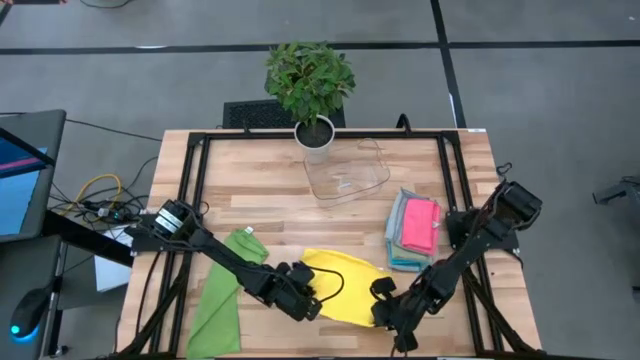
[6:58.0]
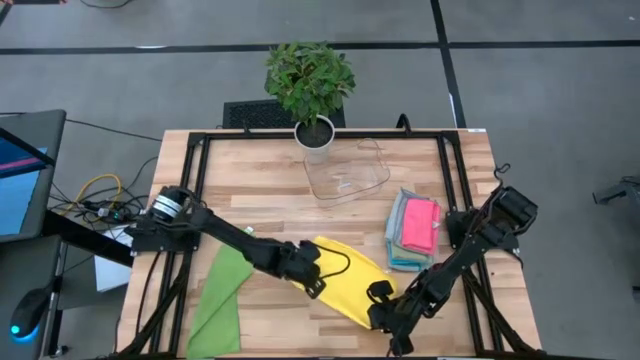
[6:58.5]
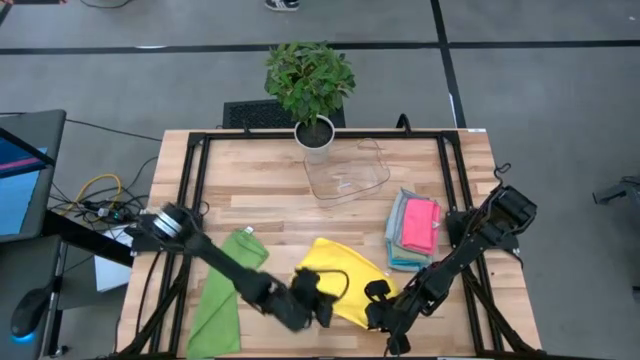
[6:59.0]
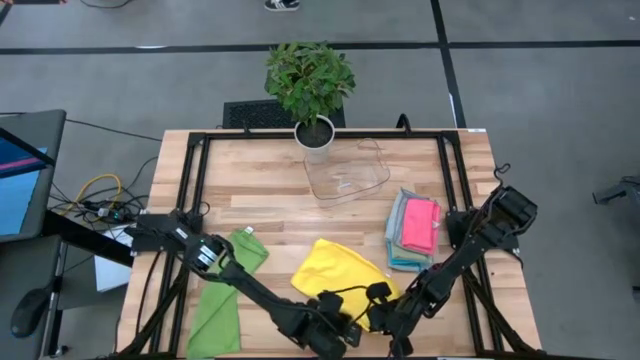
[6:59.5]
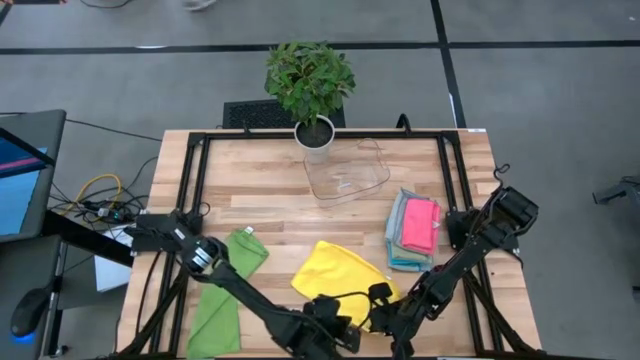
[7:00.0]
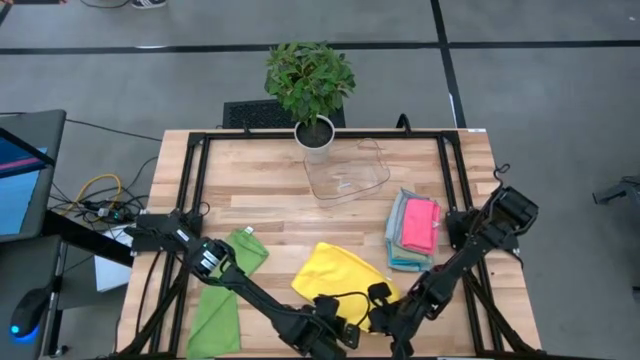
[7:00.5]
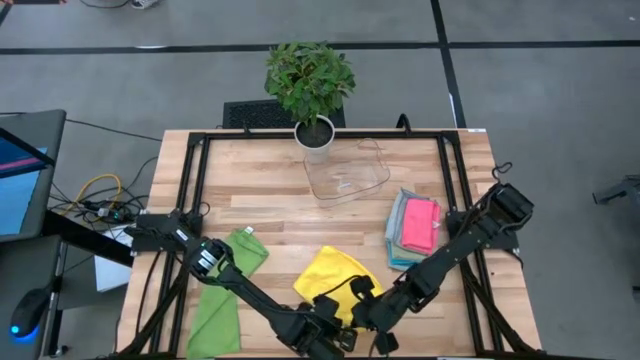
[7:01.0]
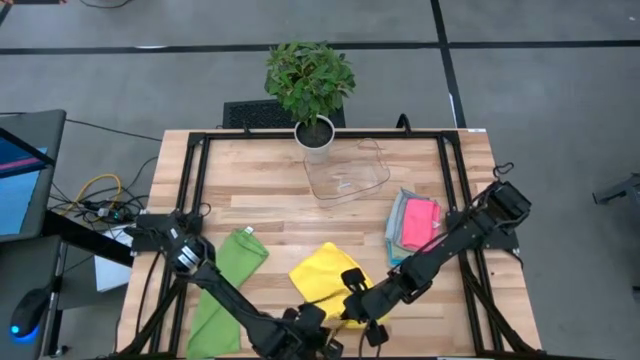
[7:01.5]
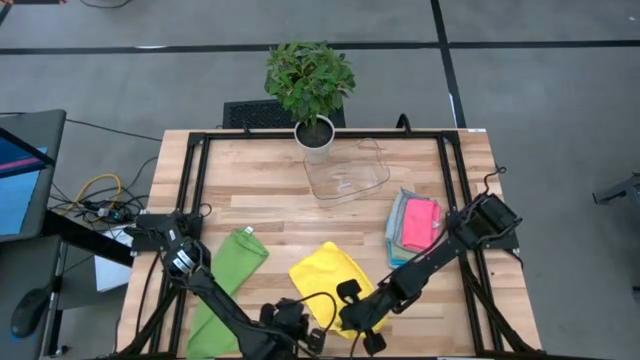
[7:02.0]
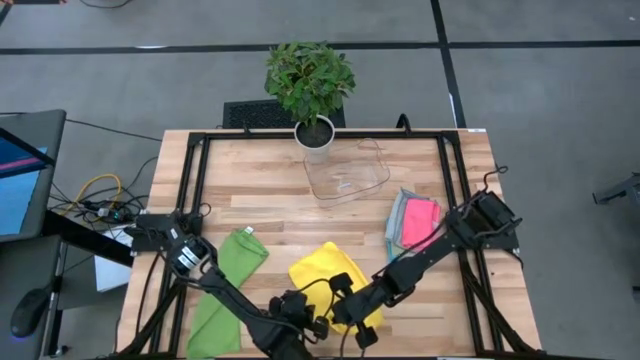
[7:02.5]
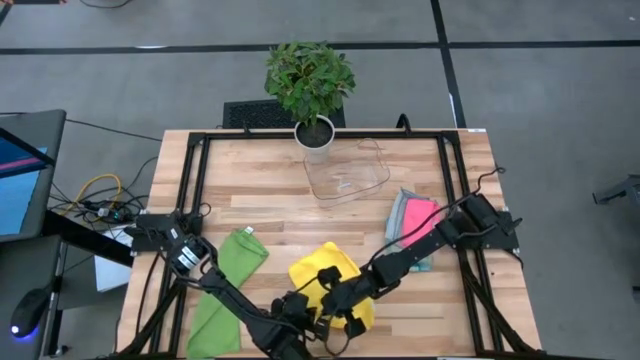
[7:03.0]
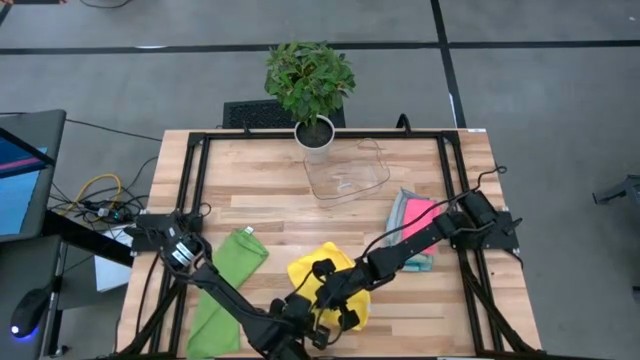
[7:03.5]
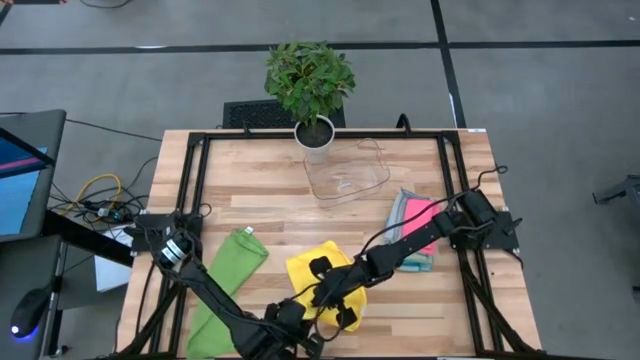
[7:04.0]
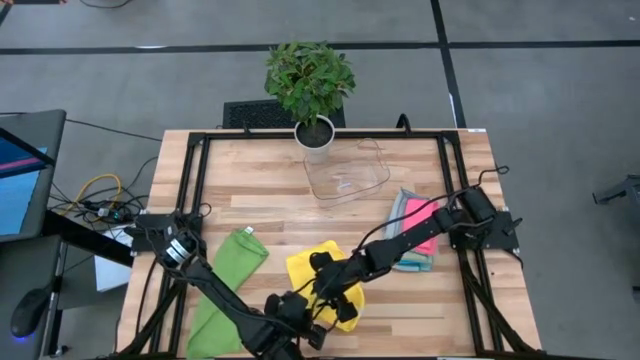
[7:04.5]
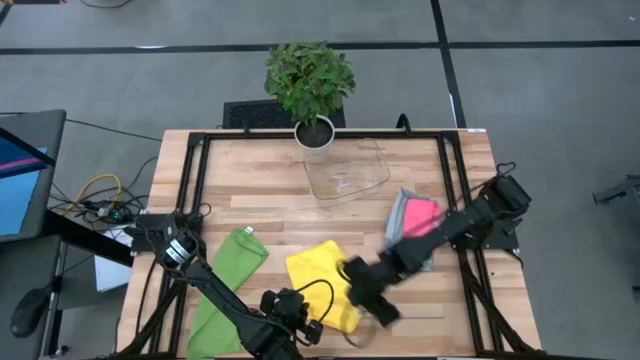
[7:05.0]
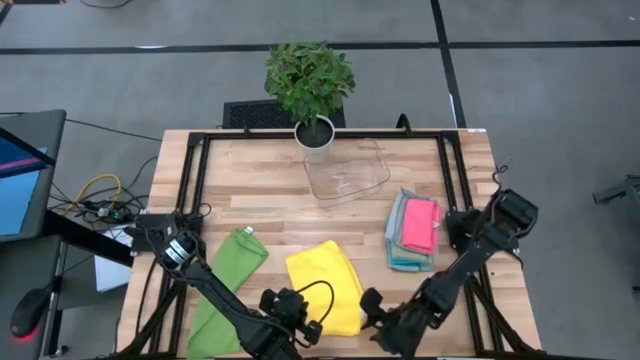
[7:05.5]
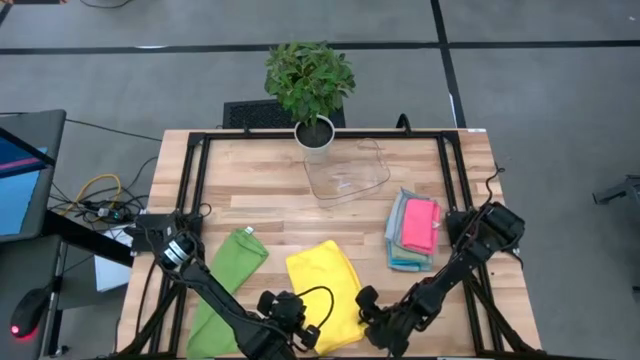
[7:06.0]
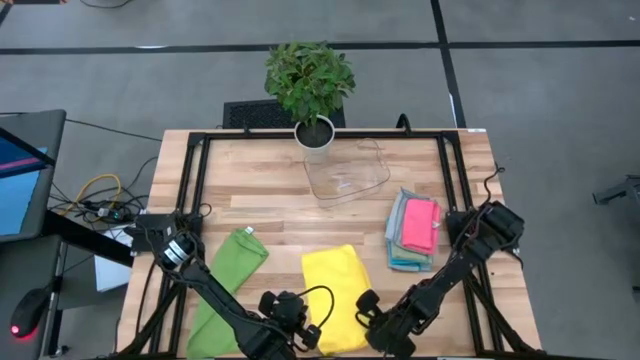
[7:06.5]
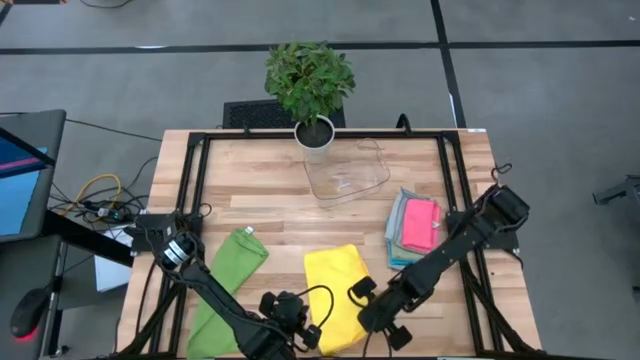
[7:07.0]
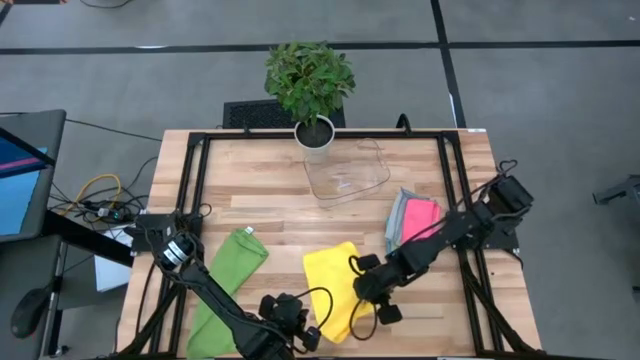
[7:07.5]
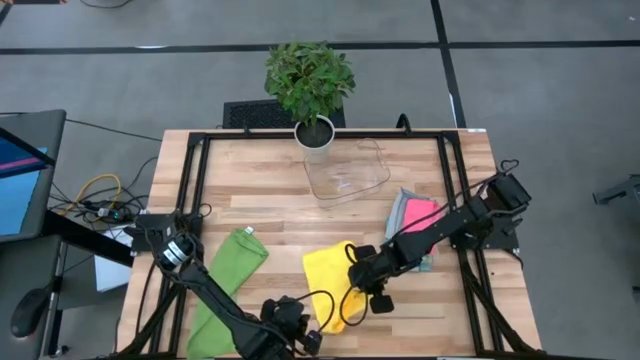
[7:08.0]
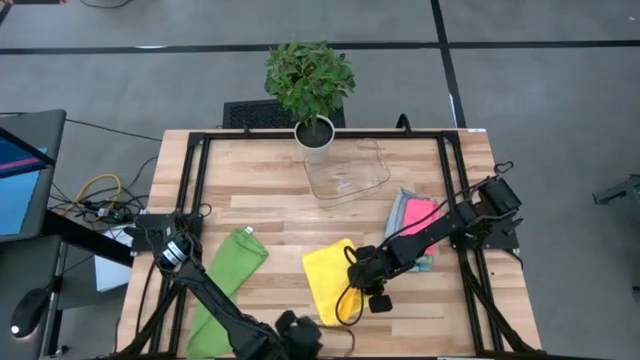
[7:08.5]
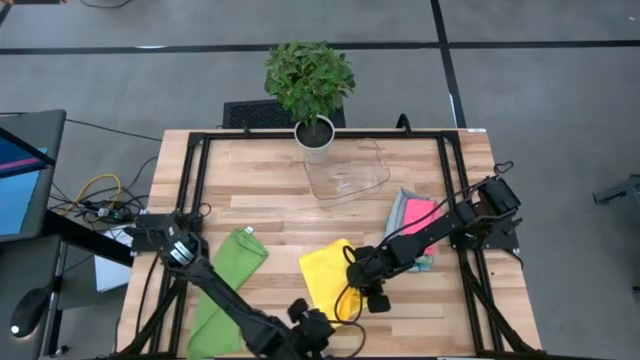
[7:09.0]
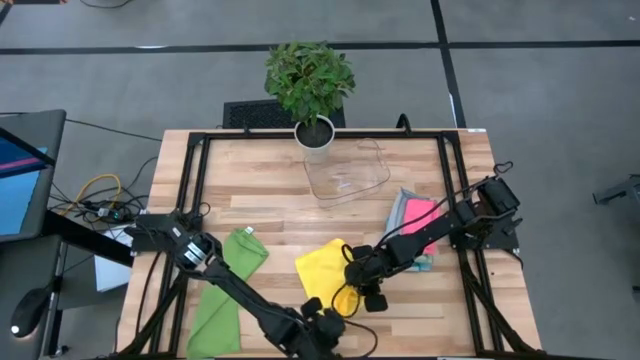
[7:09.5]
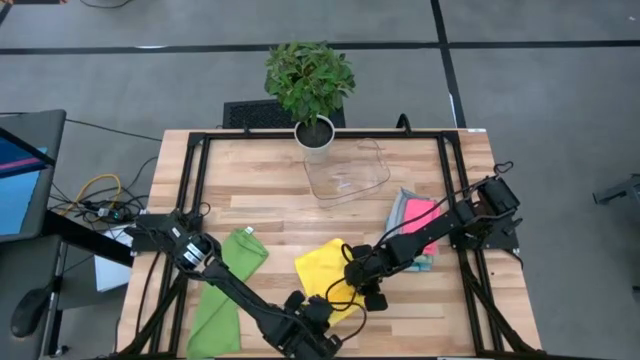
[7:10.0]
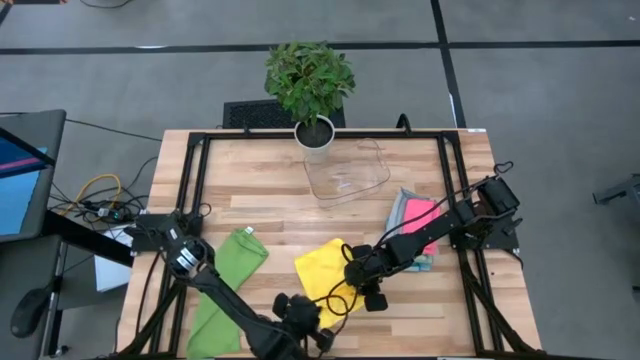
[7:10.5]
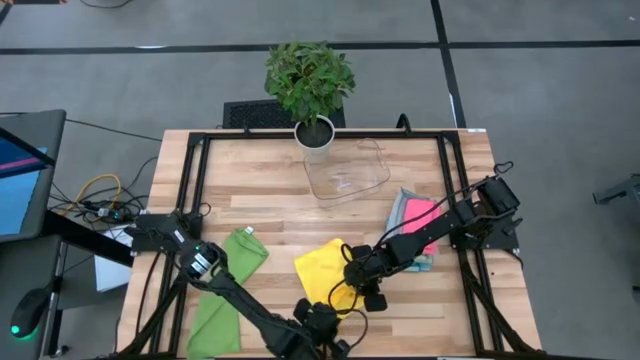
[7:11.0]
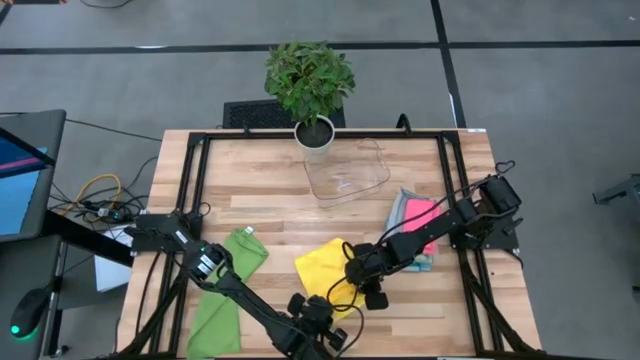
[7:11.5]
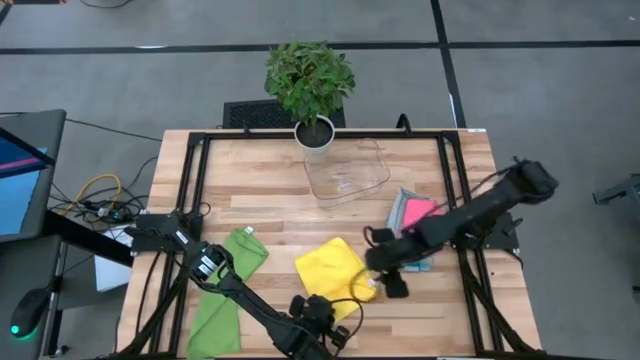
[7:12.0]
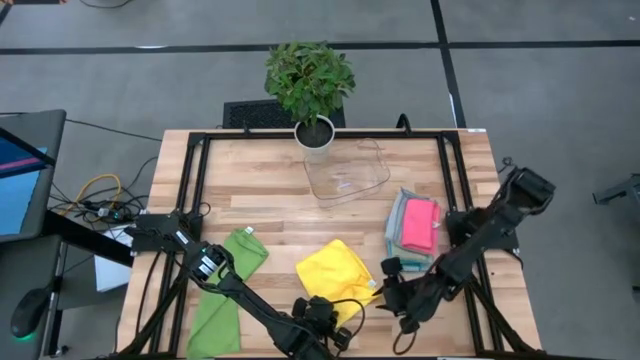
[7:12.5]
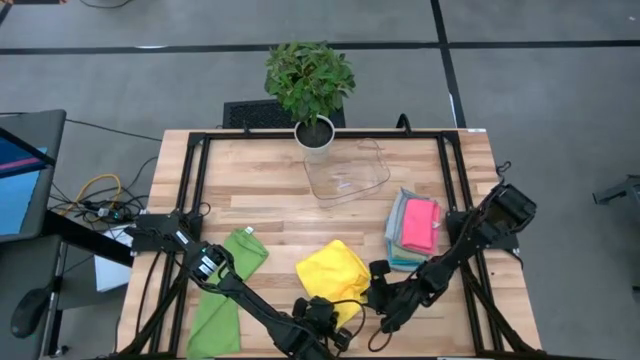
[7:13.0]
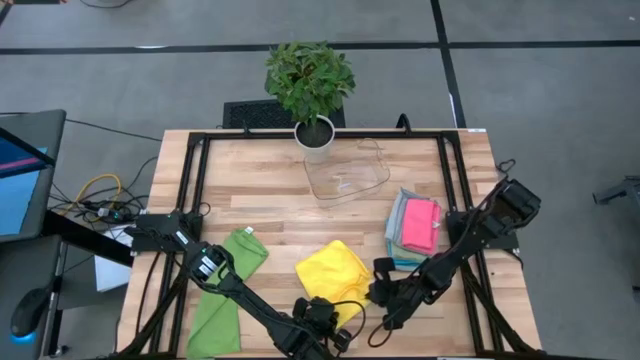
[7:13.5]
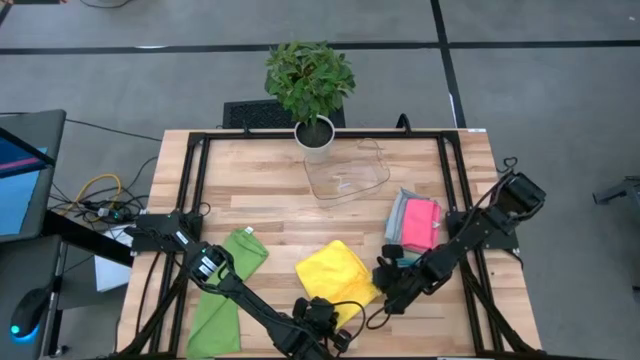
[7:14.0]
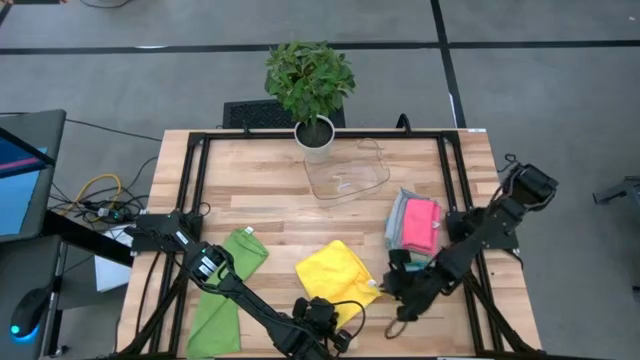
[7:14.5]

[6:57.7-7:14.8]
Task: Fold microfiber towels
Fold the yellow microfiber cloth
